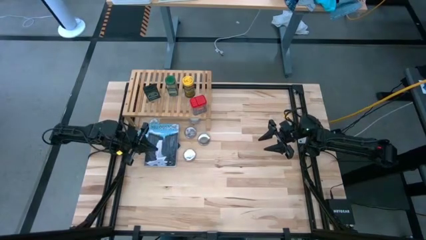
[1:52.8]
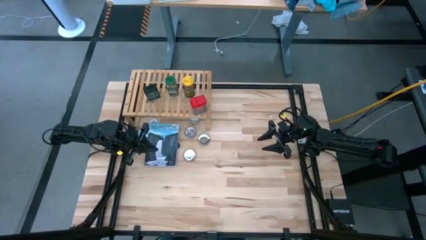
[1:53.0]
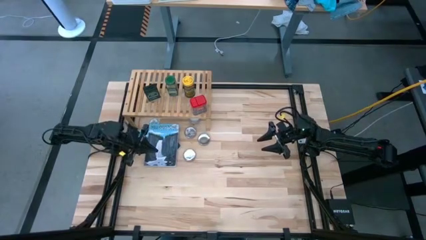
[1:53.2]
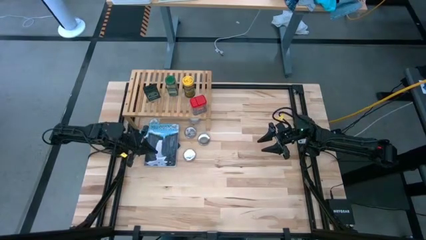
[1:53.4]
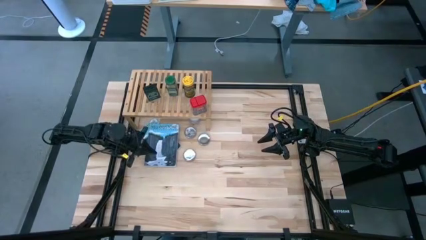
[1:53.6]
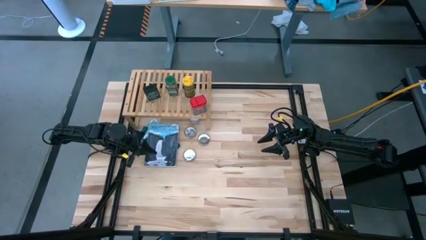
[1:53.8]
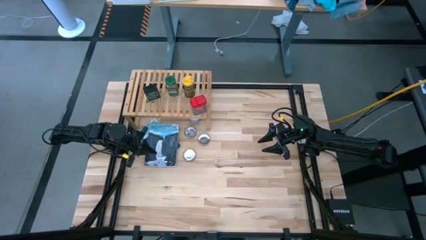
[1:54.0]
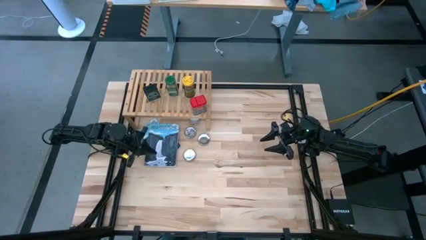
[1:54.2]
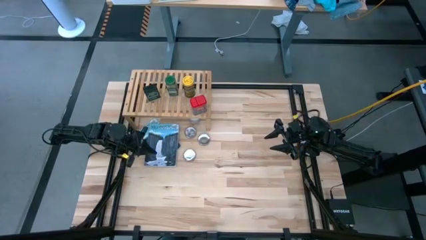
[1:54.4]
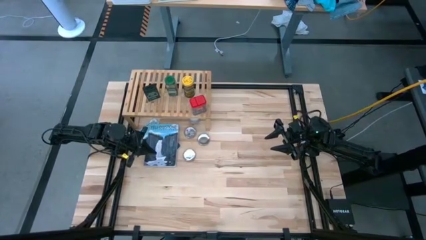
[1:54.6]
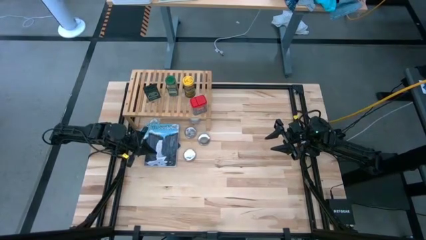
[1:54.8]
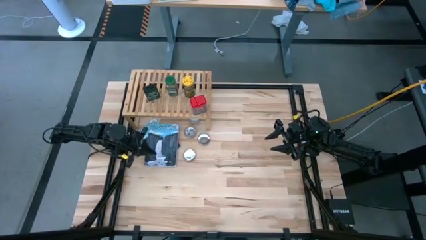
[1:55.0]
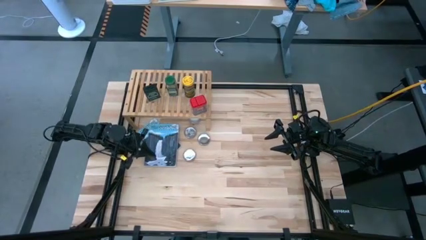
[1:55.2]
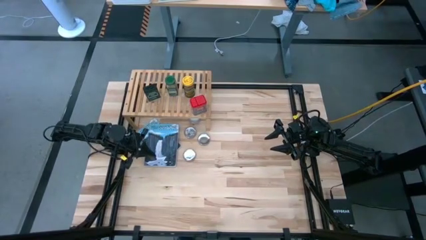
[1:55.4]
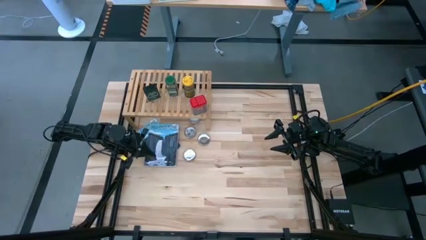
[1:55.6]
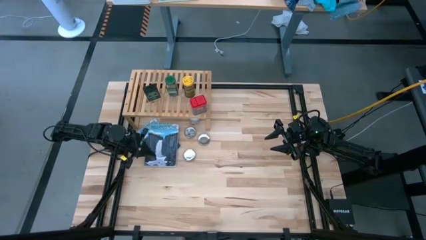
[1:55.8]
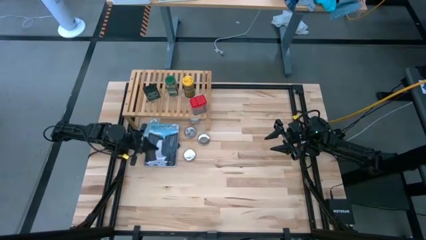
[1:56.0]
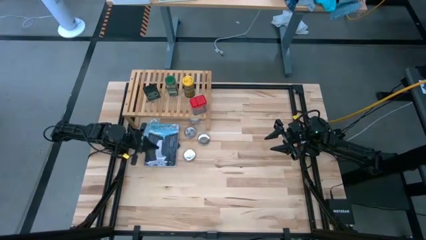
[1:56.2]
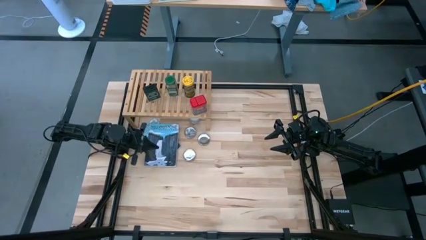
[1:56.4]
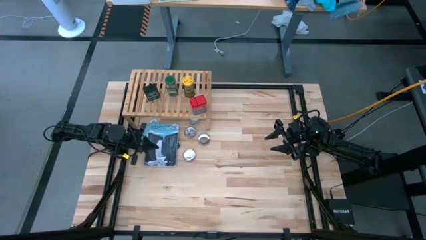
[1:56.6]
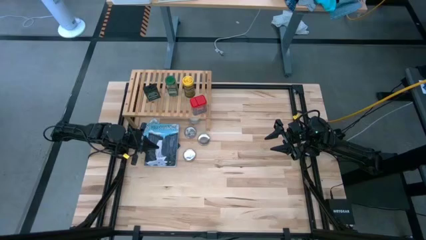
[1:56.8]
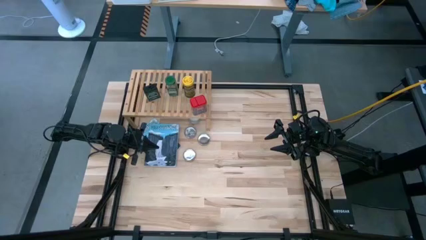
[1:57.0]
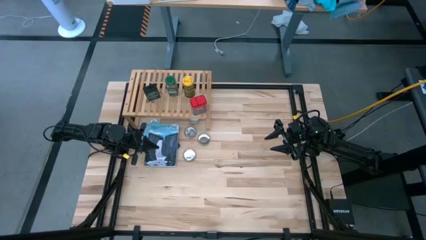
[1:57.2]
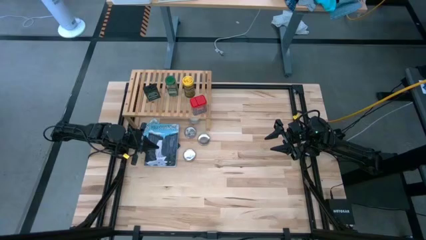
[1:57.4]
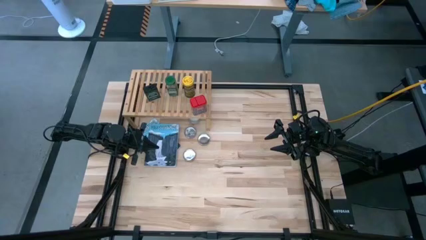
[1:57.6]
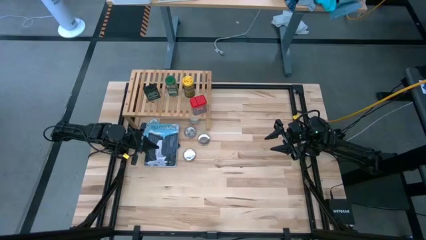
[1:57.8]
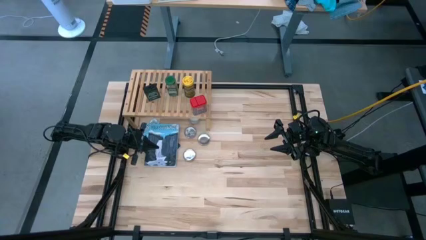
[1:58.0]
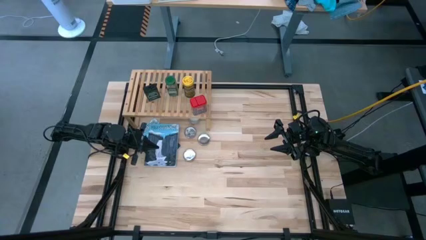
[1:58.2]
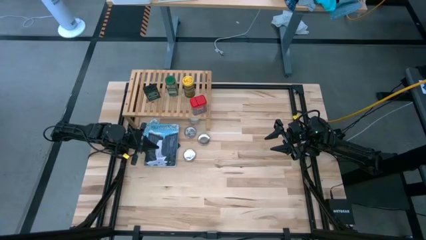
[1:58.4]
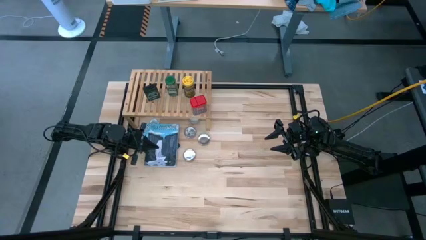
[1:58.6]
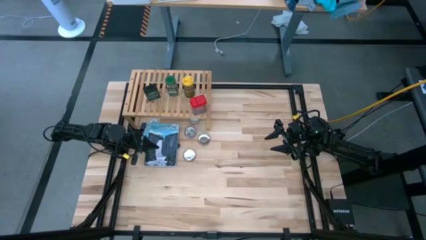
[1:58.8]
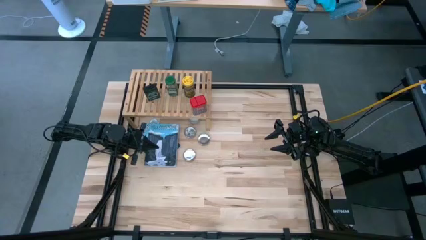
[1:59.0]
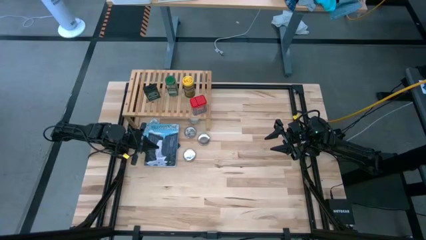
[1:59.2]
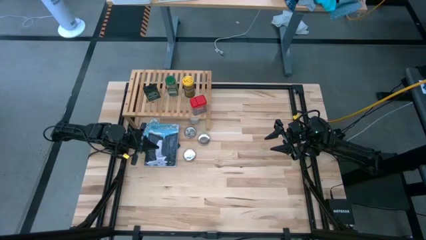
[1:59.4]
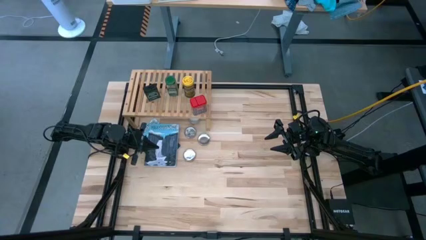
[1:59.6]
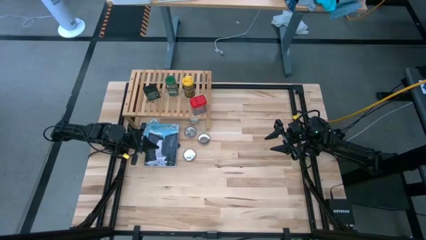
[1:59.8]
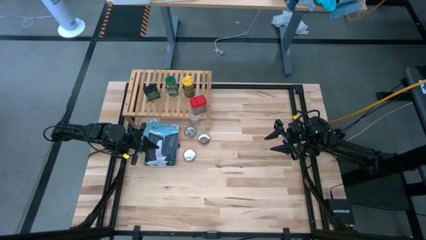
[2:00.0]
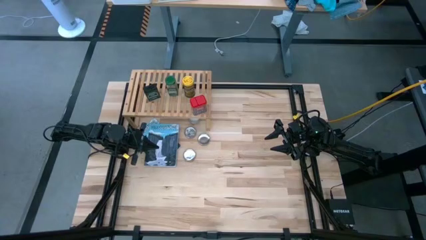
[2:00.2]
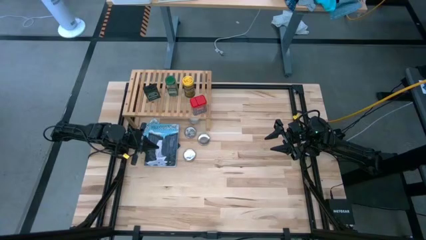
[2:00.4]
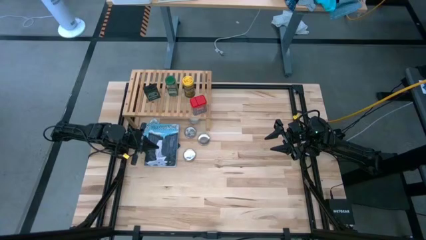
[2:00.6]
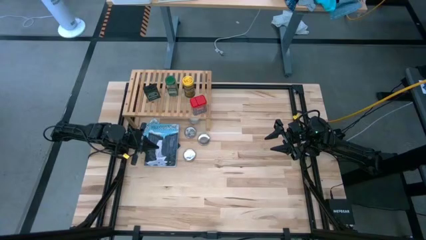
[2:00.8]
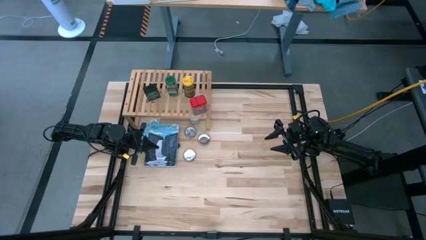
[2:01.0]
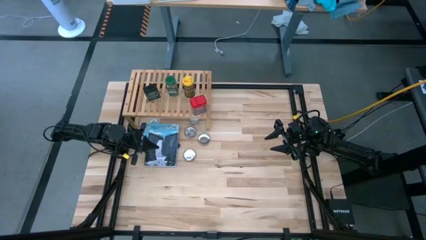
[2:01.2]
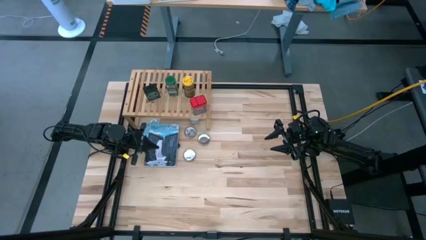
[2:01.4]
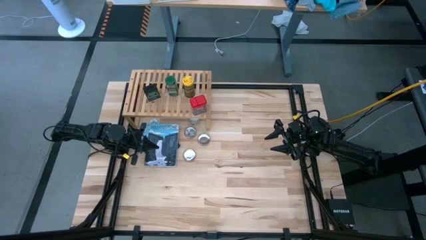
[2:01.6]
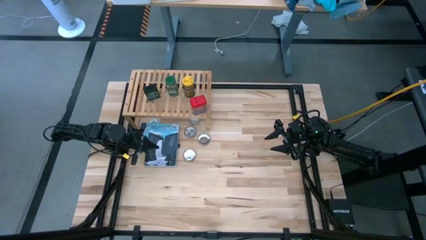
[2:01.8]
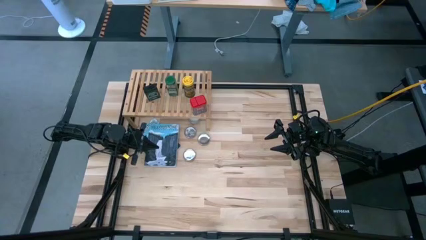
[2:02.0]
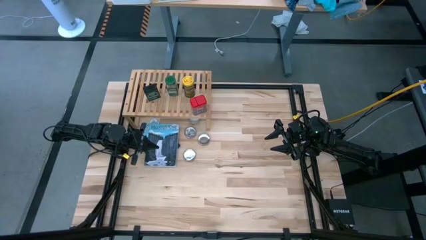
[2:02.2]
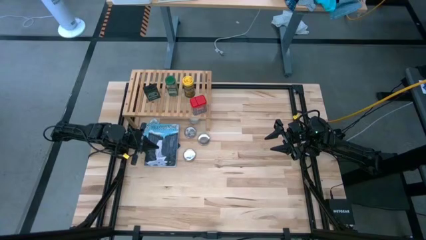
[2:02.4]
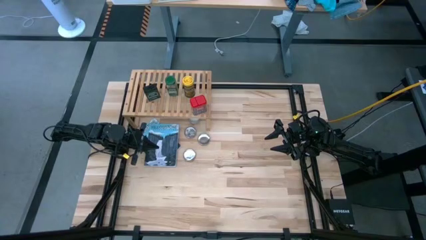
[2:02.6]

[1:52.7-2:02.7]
Task: Shelf spices
Return to Home Position

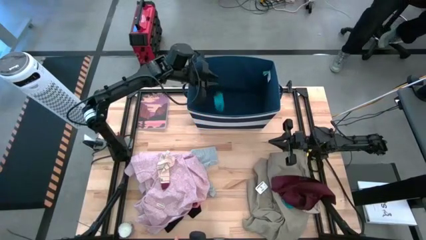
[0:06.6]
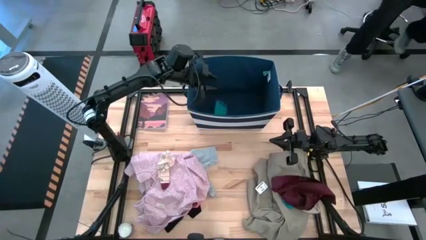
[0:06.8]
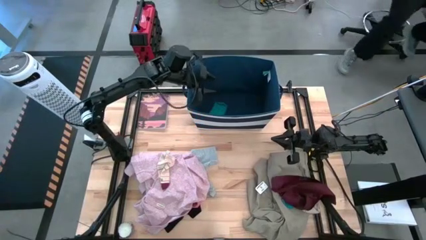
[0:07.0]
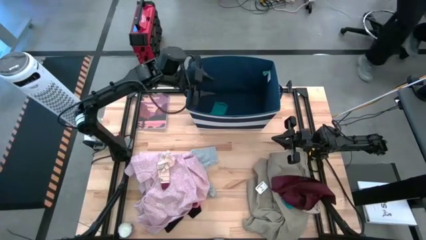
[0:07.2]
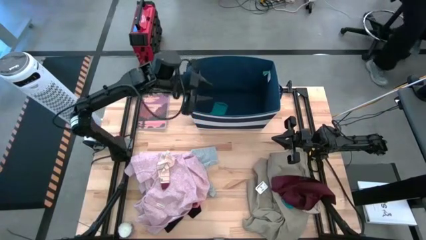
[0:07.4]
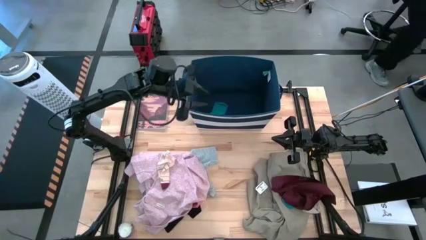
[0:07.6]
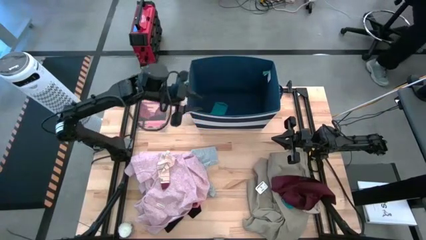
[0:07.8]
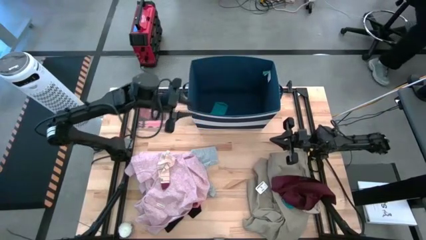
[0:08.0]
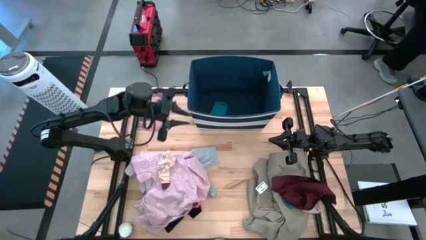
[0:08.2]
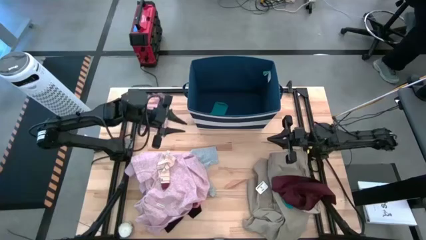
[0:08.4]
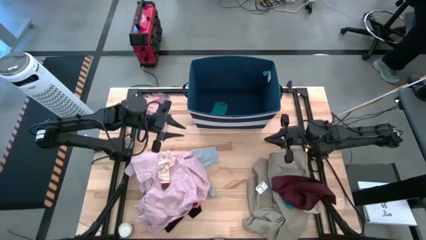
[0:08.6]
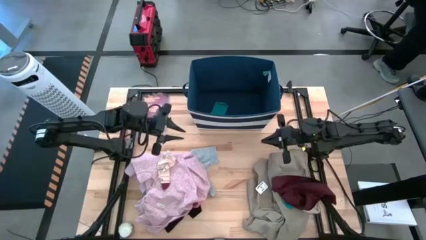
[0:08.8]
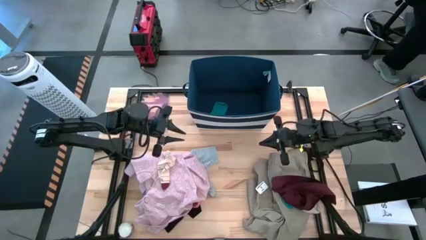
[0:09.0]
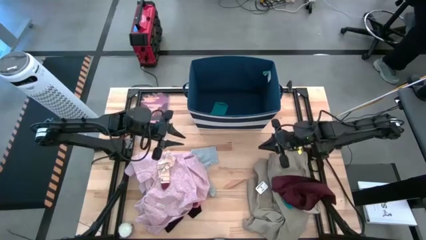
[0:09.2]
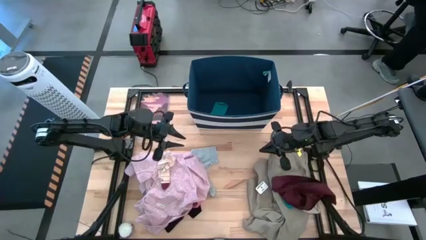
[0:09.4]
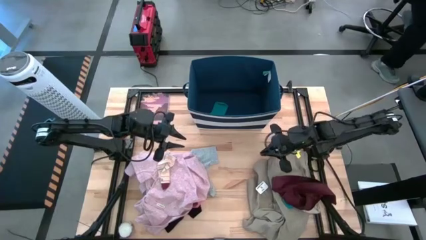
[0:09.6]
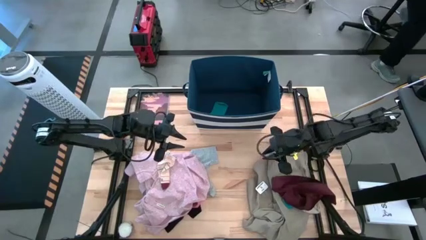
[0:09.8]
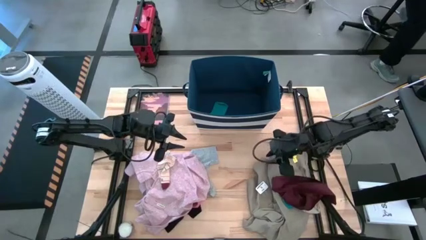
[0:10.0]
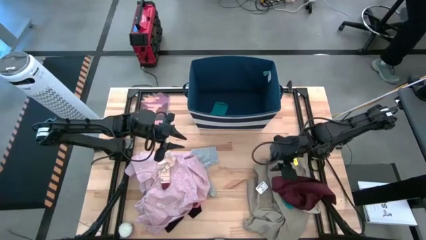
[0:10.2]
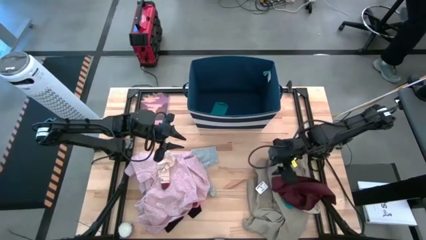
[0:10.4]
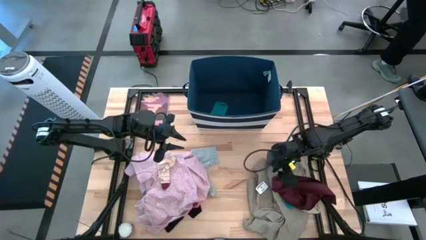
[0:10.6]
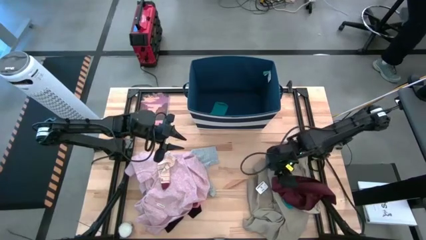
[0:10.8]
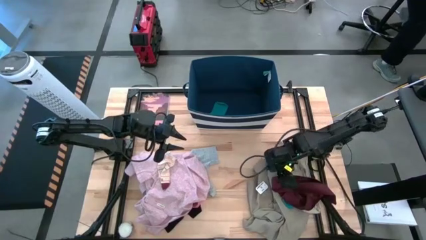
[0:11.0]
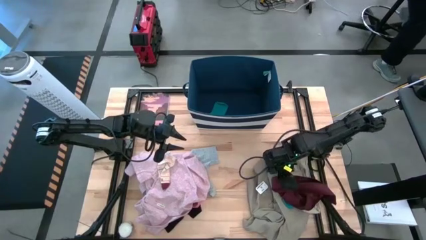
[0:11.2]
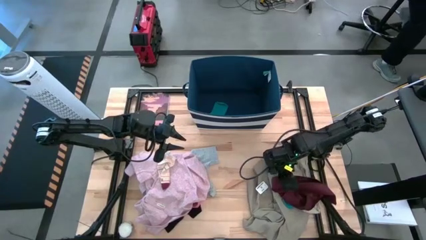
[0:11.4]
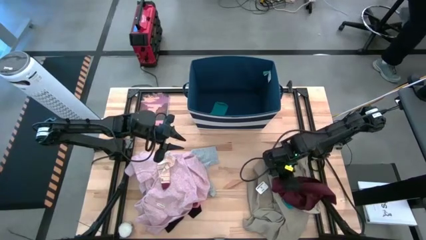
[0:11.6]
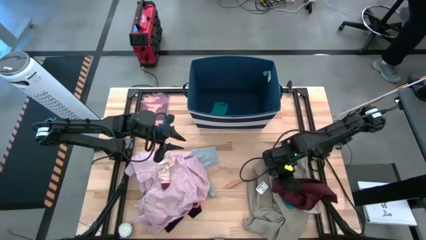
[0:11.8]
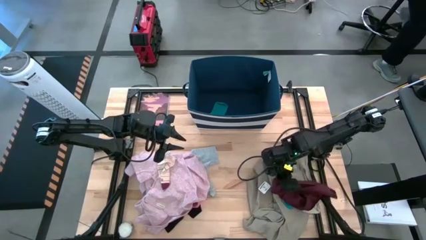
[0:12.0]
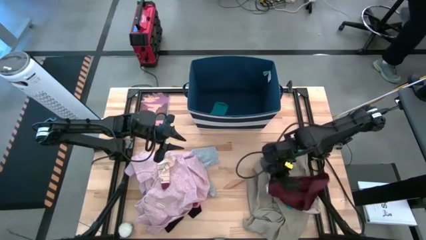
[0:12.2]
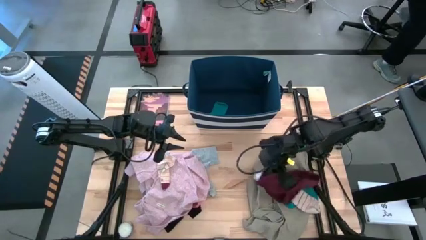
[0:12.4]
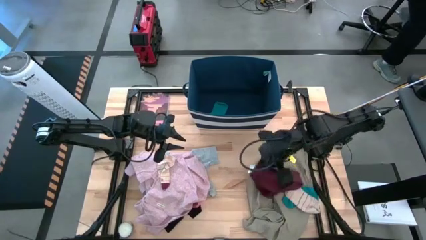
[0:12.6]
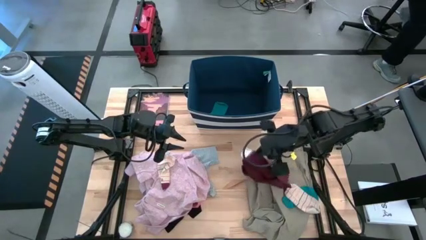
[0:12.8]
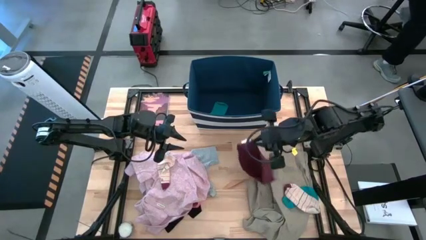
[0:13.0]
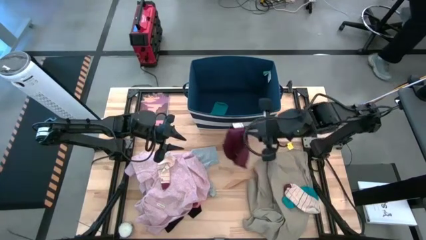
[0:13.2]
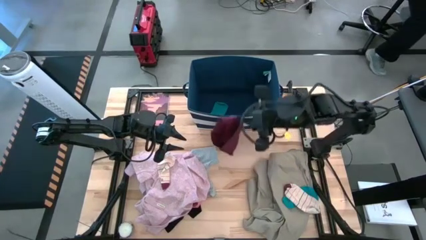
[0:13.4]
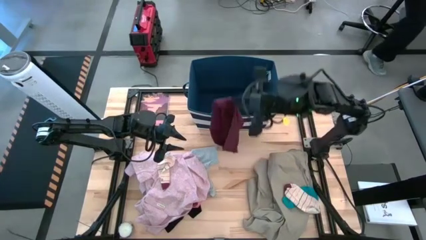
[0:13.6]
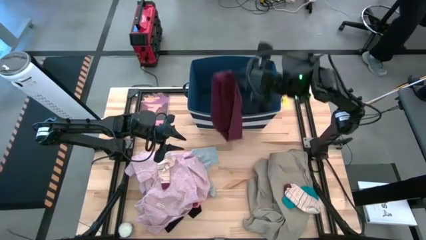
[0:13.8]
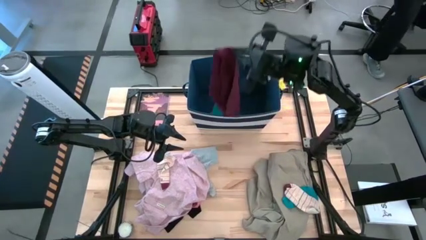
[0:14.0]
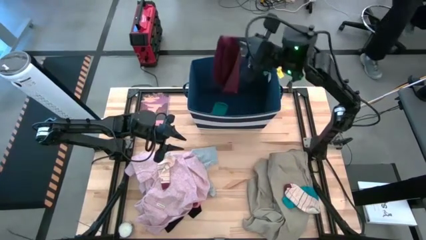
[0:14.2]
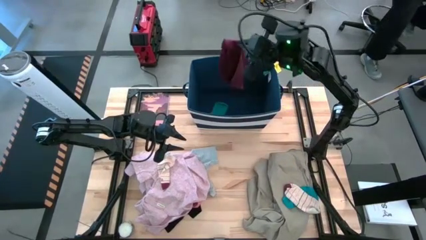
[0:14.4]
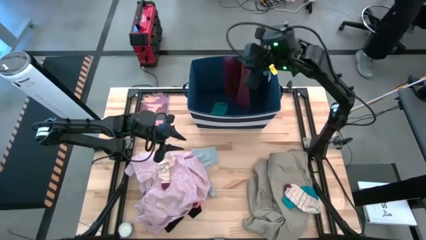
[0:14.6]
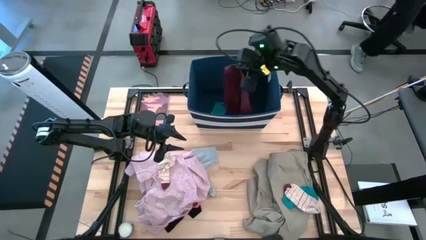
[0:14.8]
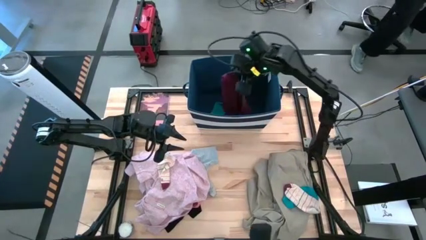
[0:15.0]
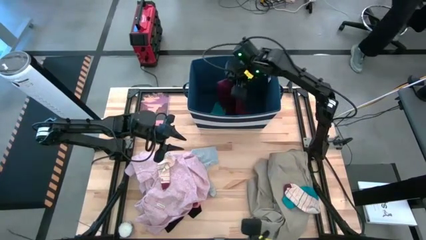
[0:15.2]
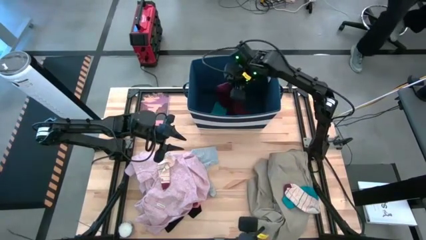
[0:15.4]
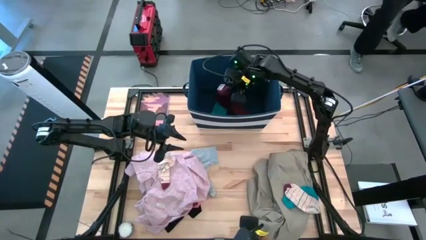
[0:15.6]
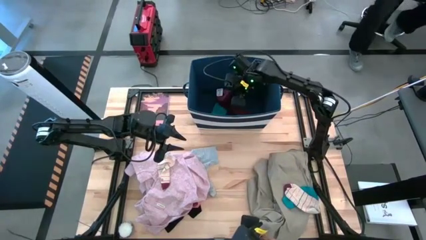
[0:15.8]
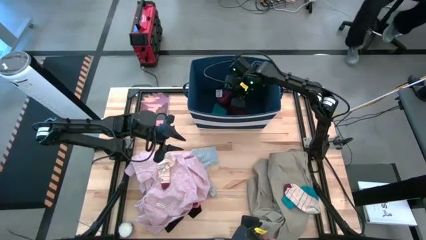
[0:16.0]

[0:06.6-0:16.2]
Task: Sort clothes
Put the maroon underwear into the blue bin
